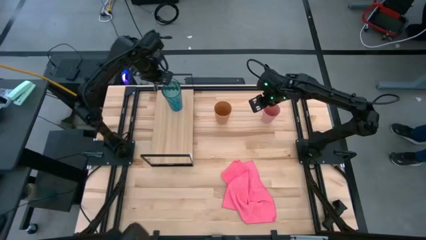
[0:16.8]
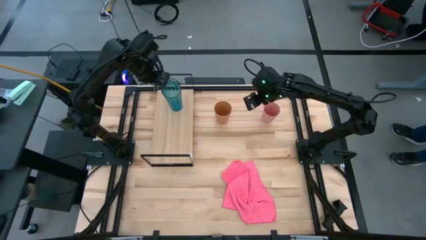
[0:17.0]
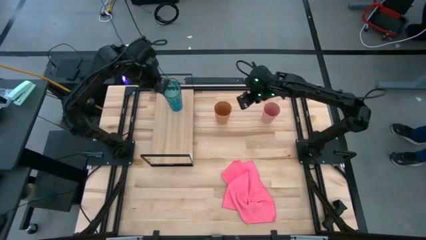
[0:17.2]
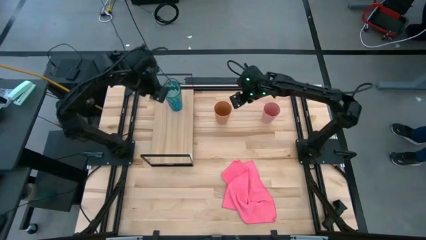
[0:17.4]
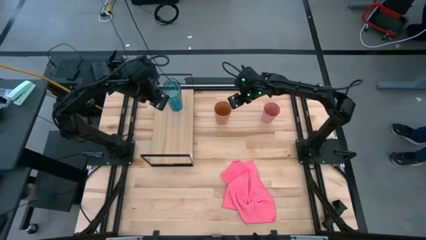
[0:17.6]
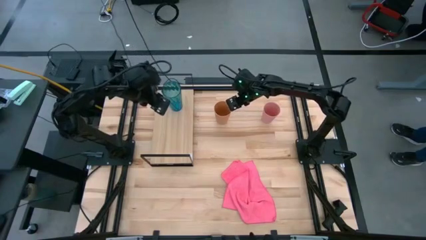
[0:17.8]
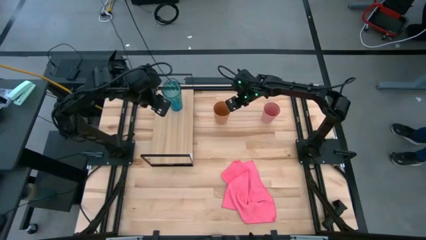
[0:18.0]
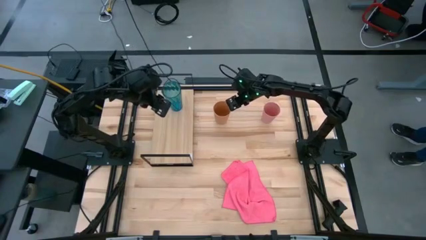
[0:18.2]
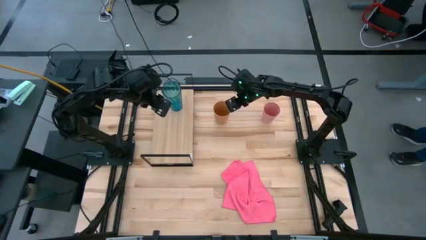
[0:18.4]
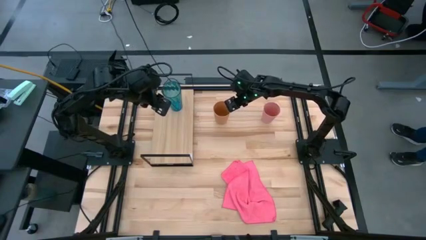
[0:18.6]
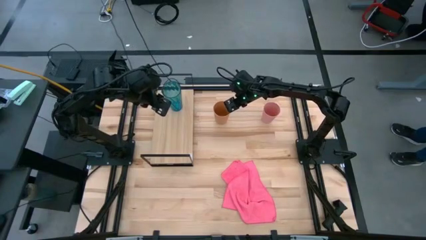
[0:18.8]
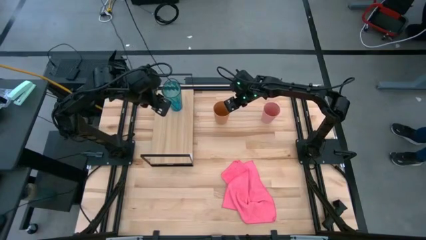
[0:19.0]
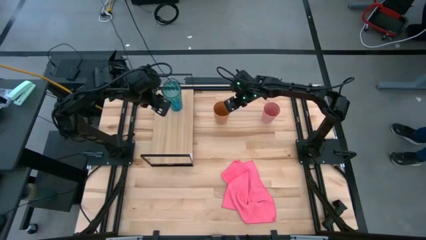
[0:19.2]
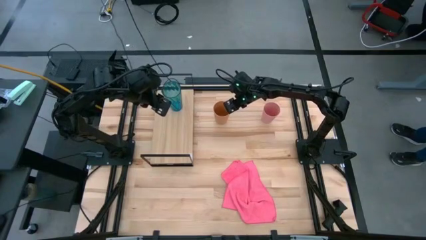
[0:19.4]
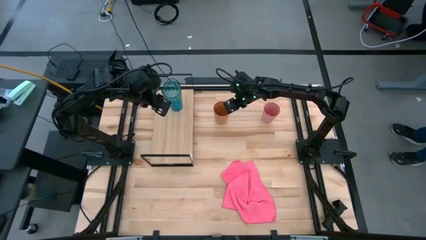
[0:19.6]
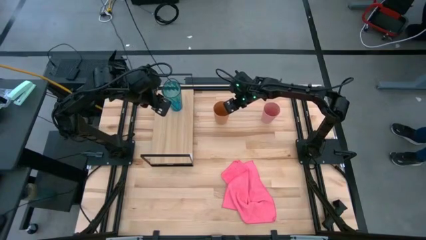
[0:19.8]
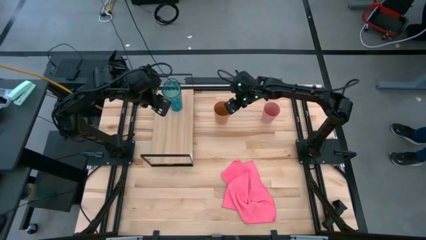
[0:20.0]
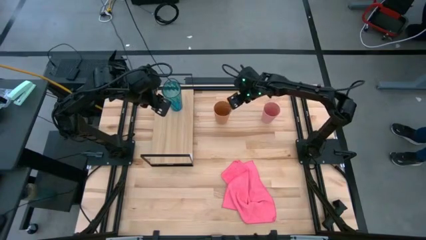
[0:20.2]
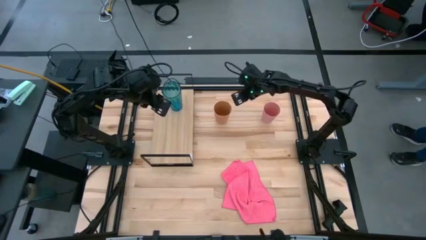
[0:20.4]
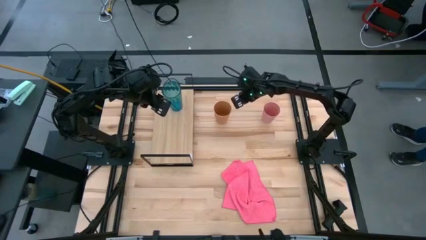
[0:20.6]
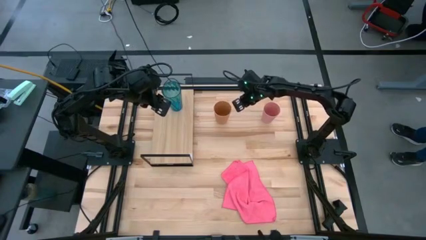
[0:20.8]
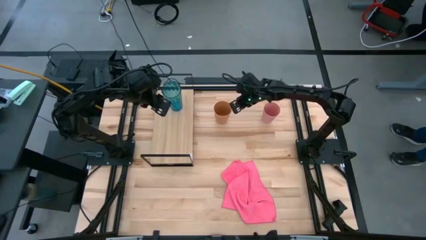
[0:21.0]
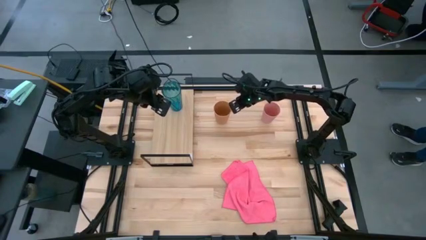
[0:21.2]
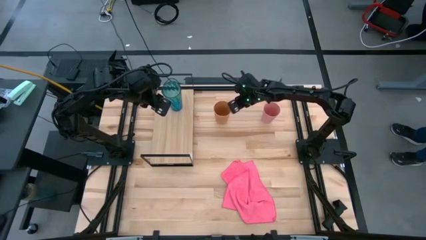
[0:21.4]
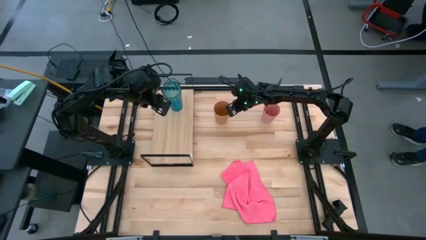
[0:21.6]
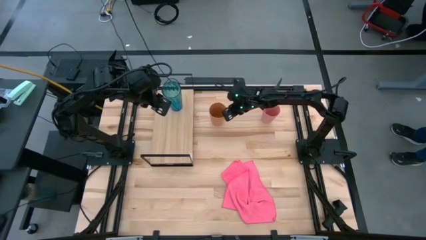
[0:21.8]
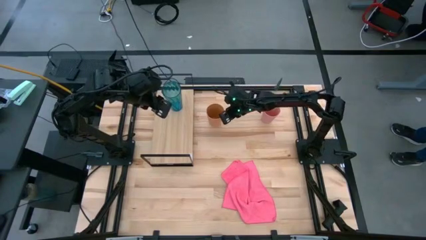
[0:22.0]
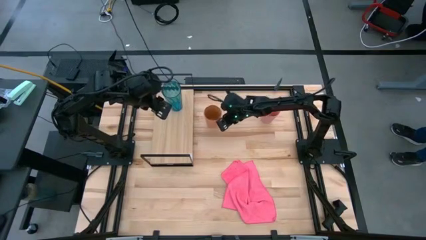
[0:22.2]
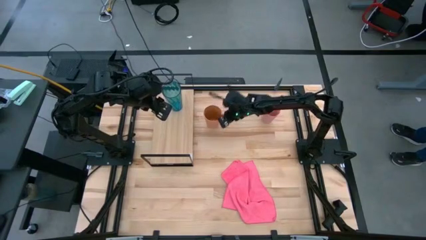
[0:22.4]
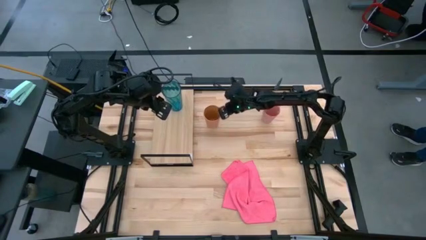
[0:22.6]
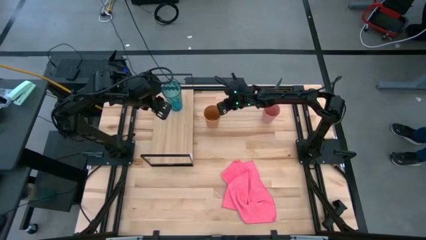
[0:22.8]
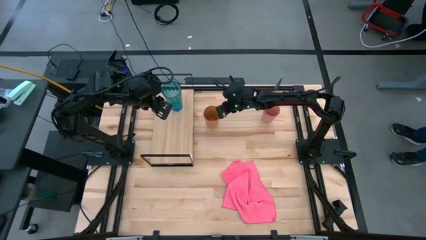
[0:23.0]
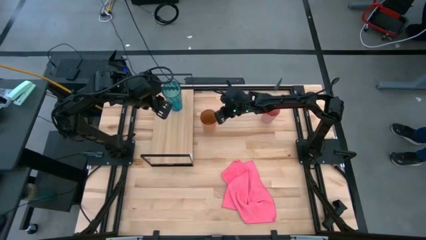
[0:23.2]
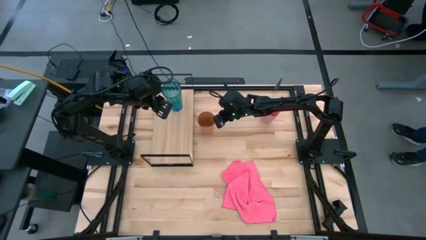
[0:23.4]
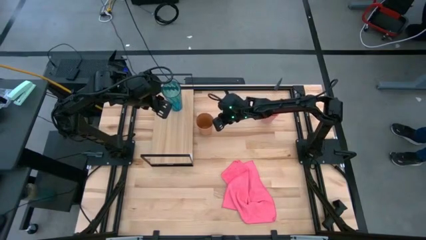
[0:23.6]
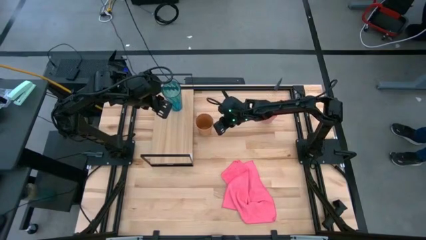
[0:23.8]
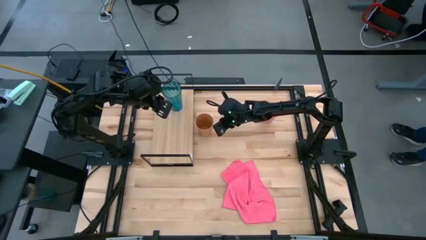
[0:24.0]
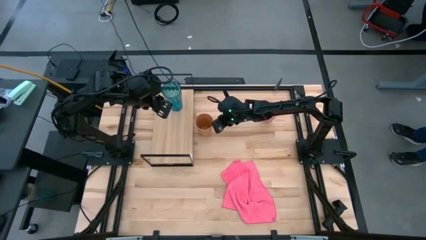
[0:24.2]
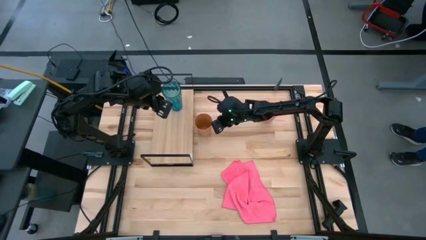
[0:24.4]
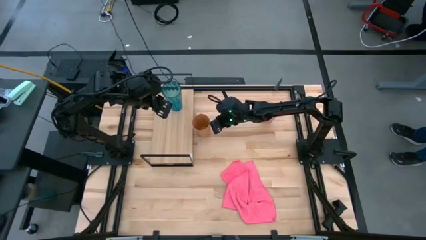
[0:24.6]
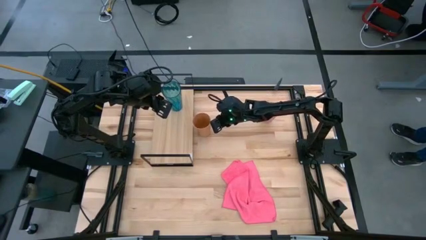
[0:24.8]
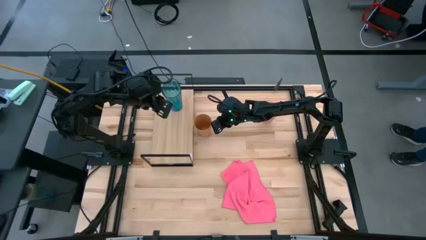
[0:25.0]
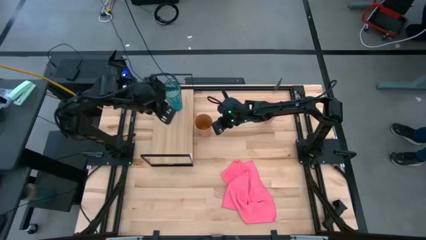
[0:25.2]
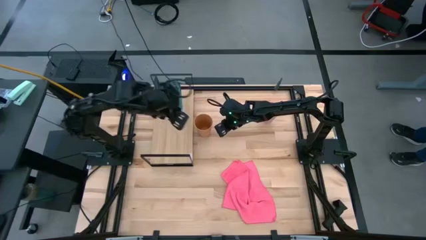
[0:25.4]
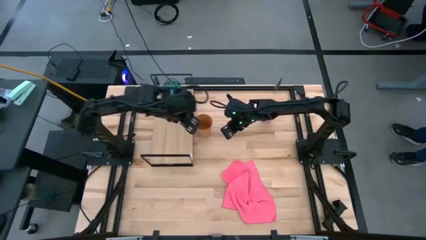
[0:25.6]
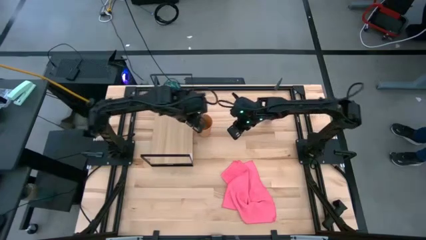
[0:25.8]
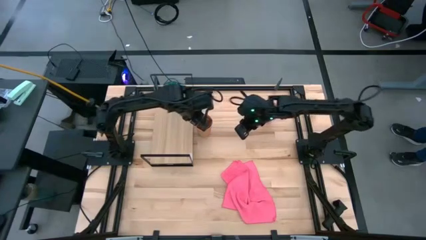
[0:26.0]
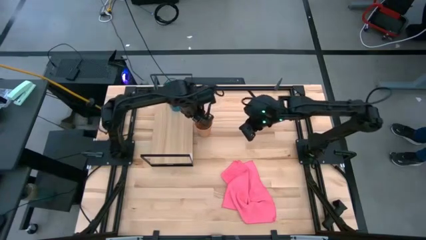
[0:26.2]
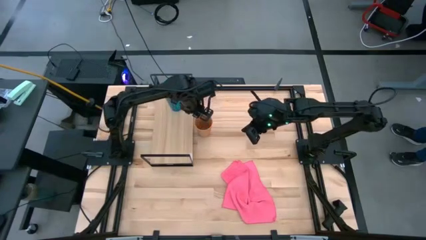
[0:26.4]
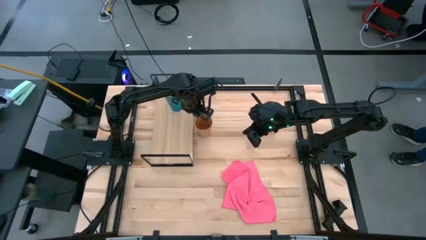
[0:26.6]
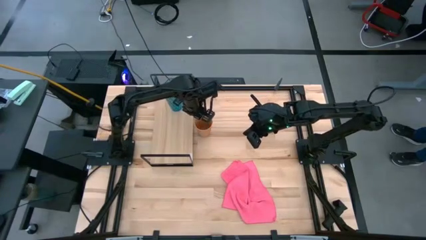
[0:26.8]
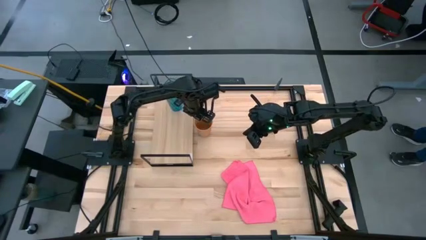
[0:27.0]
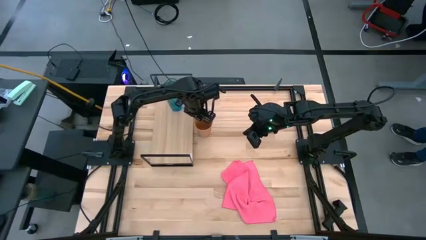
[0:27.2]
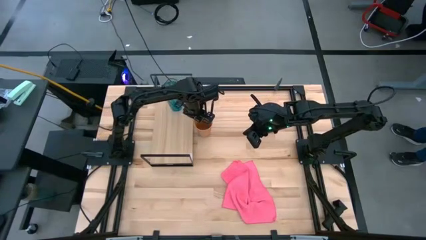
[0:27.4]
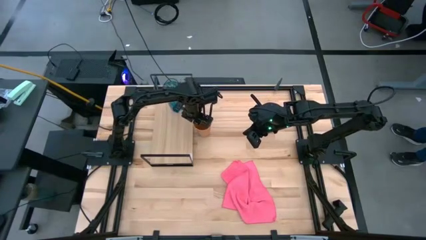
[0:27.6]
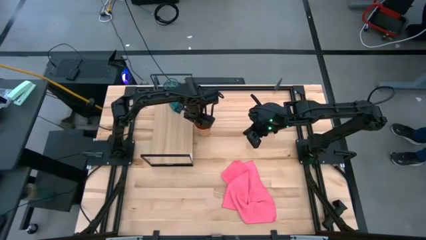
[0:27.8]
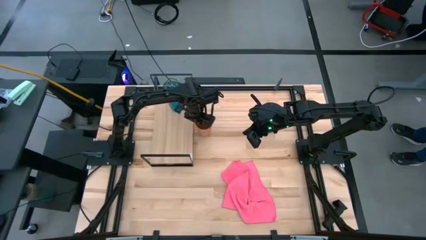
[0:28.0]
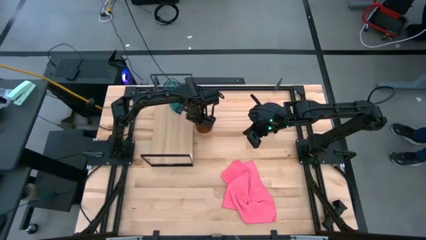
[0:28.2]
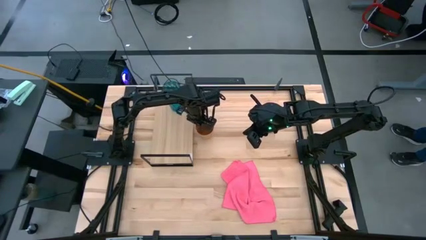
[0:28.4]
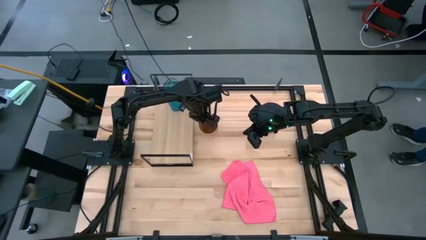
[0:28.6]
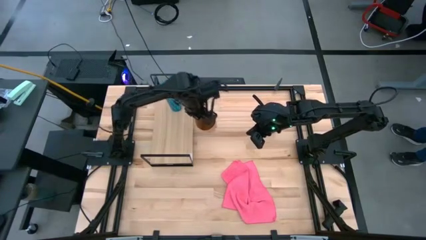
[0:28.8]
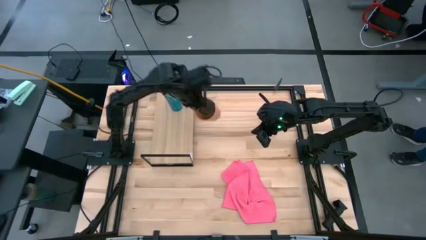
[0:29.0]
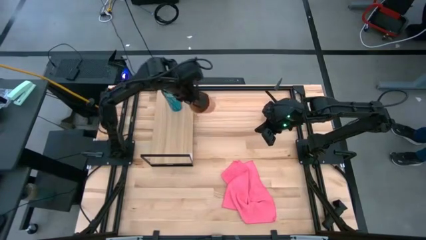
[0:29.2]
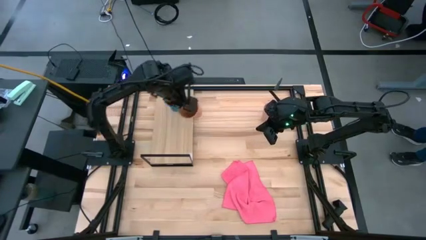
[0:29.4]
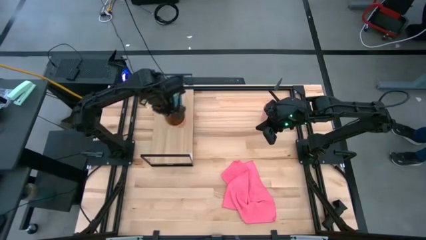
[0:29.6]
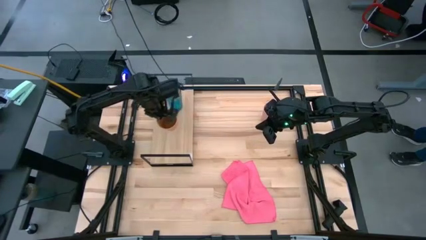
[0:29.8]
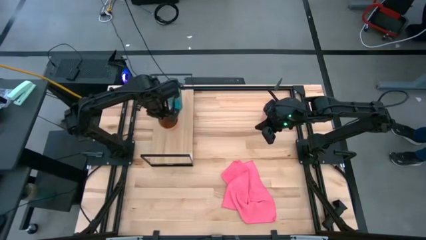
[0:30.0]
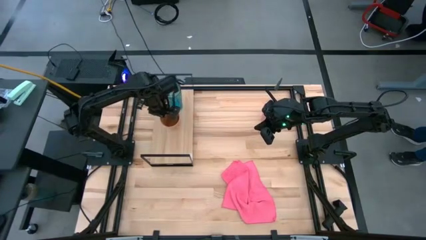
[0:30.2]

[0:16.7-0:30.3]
Task: Stack small to large cups/mugs on shelf
Put the orange cup on the shelf
